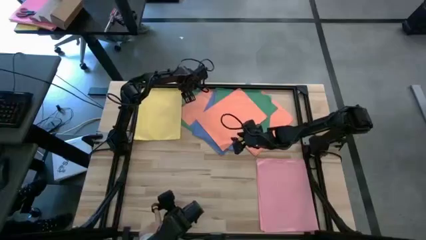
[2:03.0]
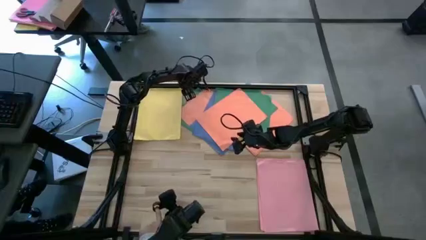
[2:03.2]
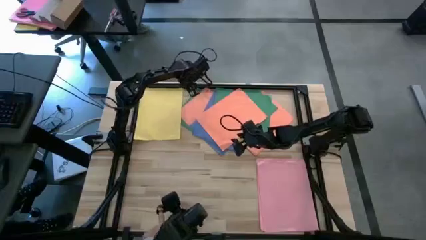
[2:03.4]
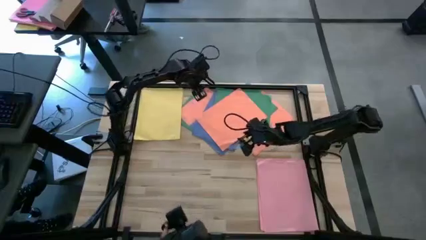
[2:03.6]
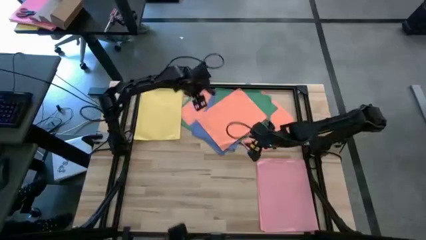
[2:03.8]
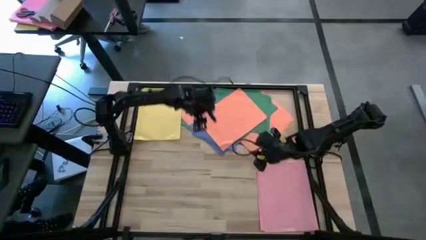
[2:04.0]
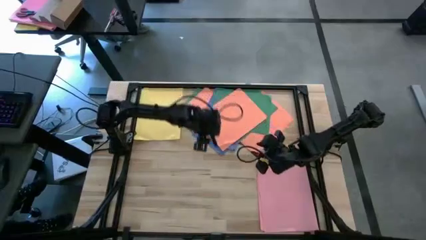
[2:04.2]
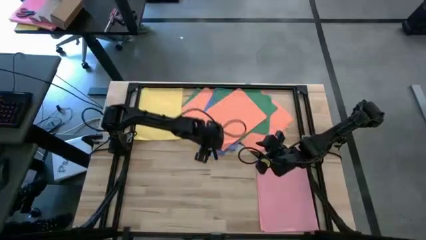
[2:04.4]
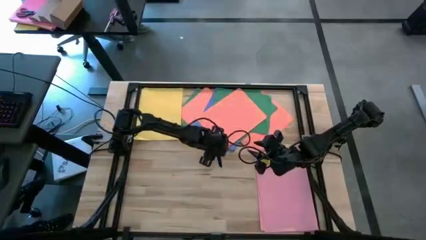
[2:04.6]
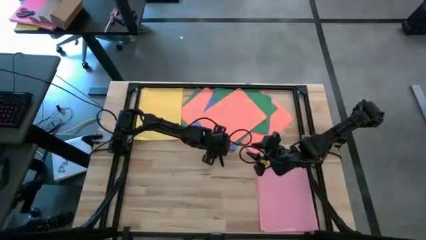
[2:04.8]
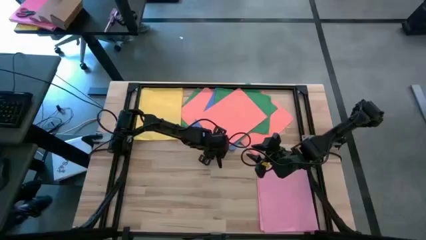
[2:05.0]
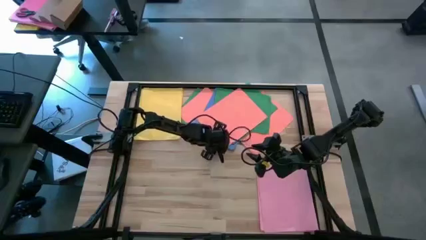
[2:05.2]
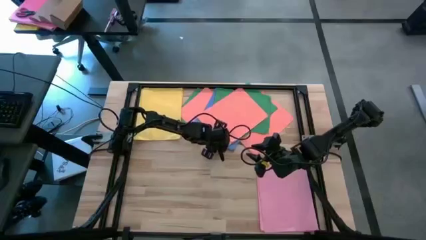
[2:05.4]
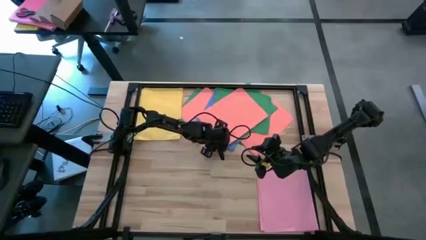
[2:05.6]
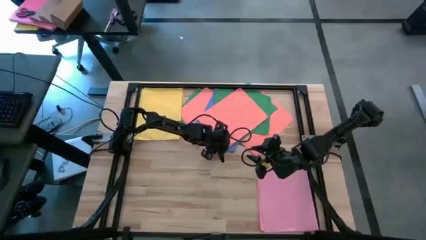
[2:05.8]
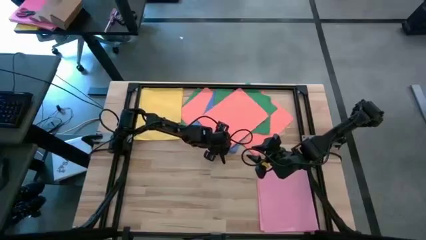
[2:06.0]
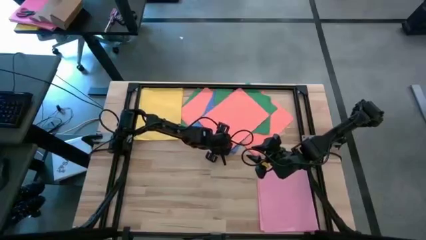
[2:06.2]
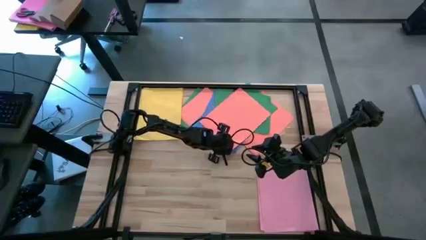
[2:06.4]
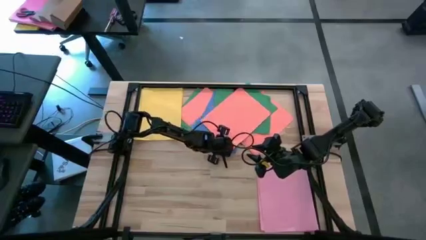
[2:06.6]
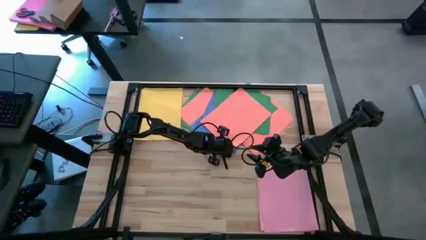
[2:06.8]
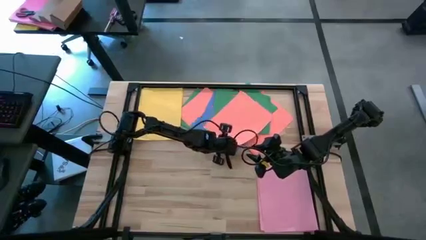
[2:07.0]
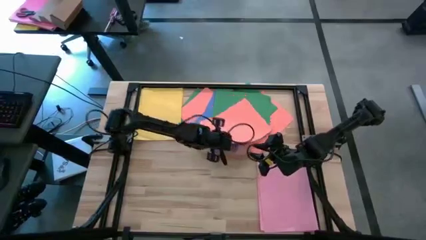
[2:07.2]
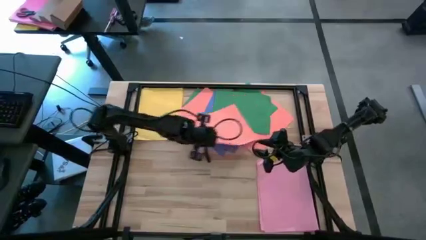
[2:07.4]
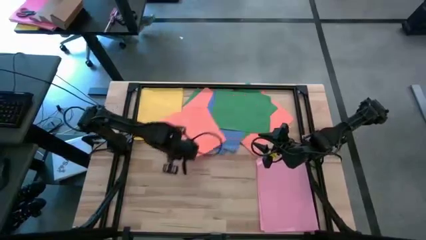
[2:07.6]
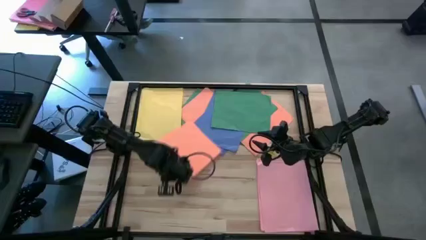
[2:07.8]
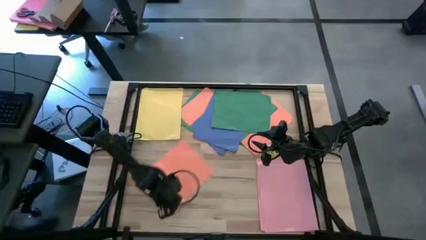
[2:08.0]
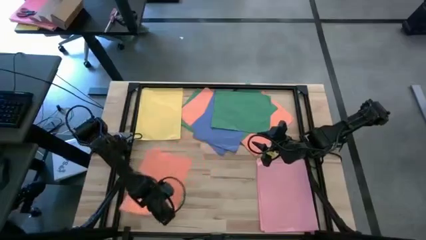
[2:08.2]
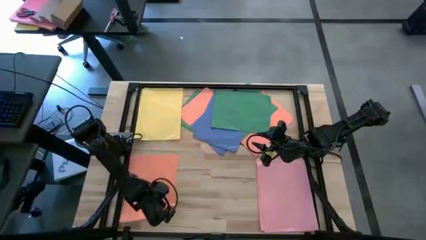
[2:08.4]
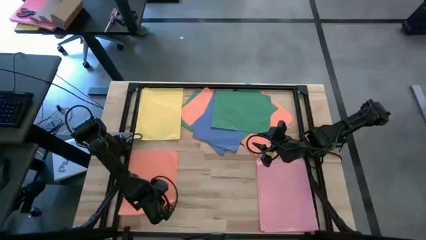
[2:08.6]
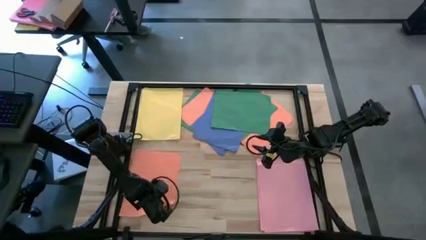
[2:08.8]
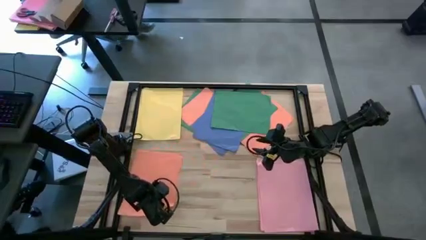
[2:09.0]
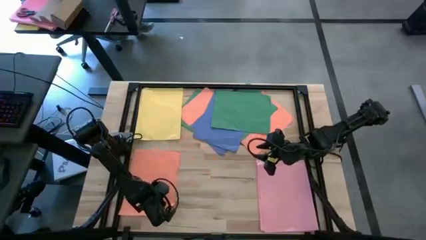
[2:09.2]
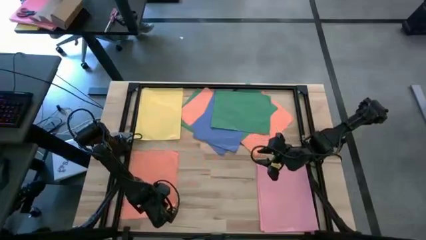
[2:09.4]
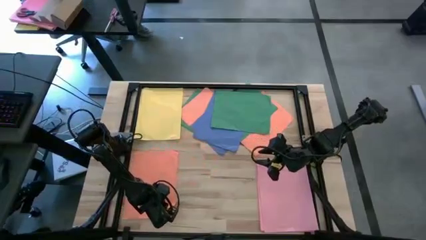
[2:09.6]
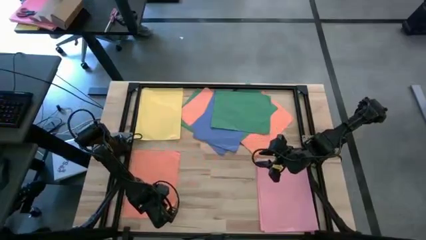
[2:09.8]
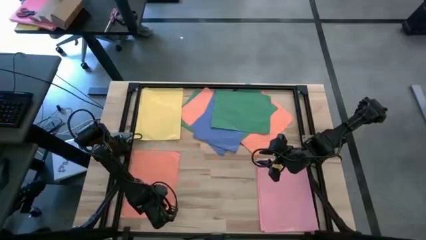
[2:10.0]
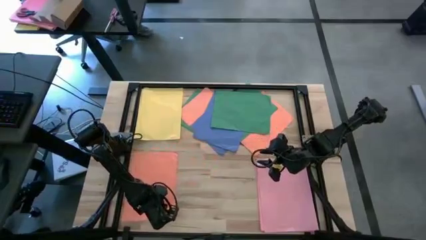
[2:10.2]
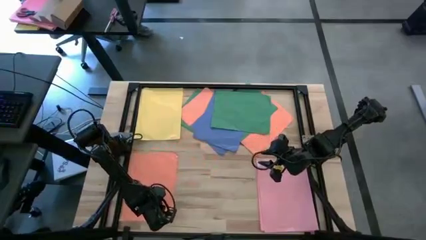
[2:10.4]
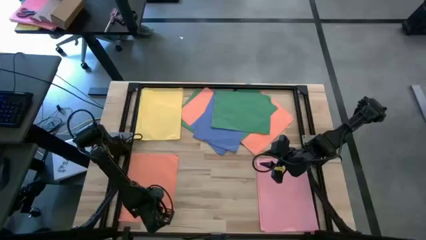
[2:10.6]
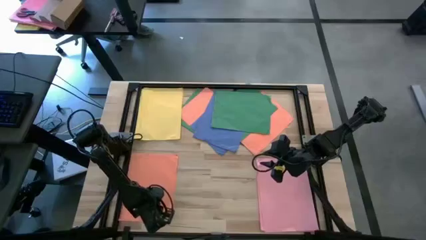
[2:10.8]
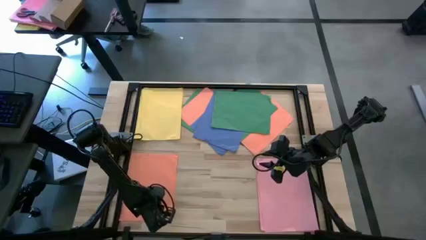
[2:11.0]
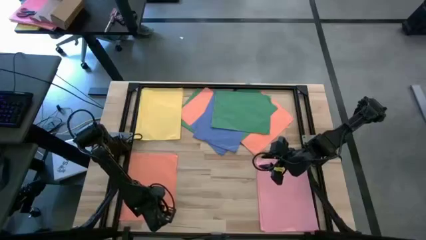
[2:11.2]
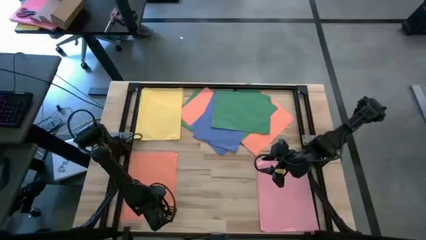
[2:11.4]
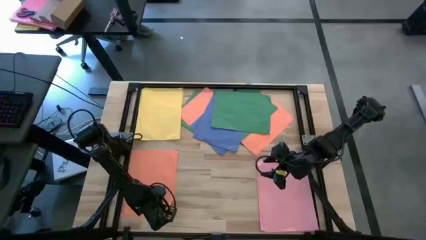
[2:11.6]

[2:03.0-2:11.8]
Task: Organize paper
Move the orange paper to the bottom left of the table

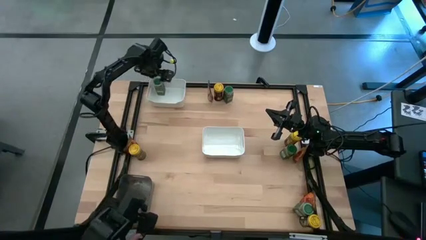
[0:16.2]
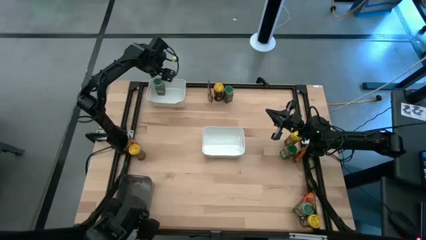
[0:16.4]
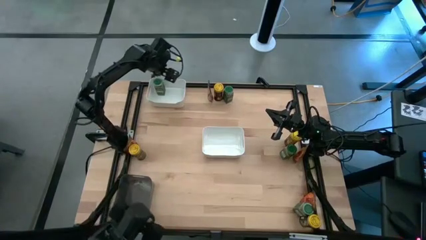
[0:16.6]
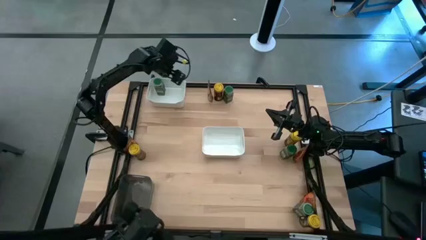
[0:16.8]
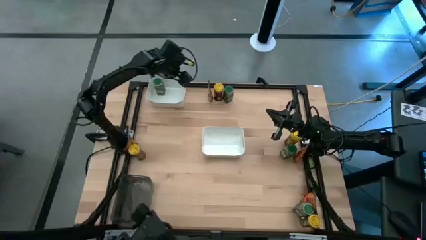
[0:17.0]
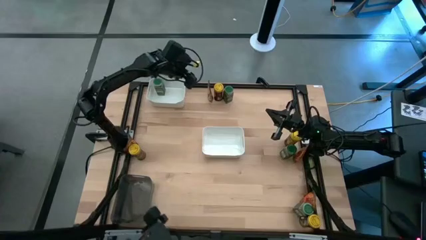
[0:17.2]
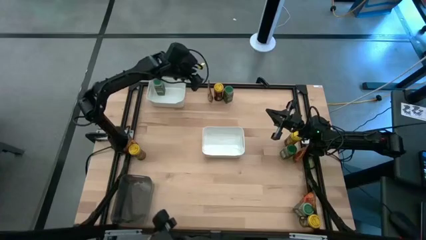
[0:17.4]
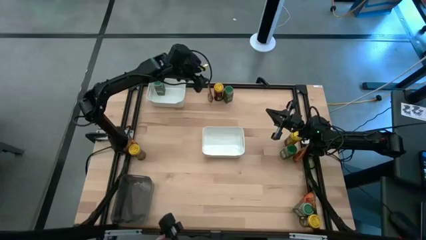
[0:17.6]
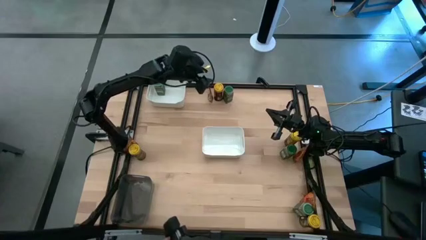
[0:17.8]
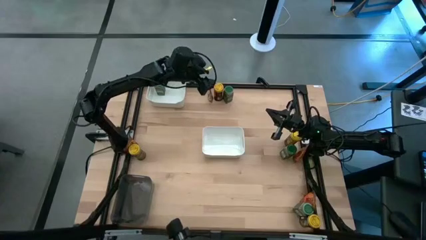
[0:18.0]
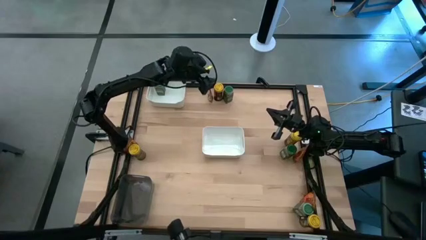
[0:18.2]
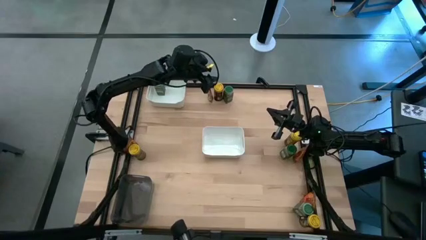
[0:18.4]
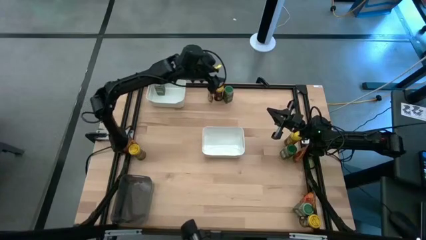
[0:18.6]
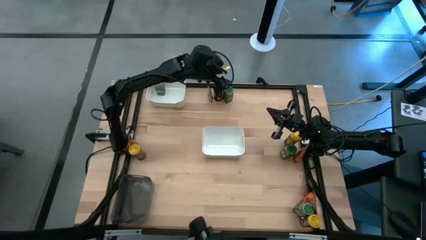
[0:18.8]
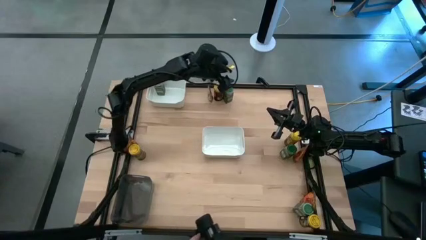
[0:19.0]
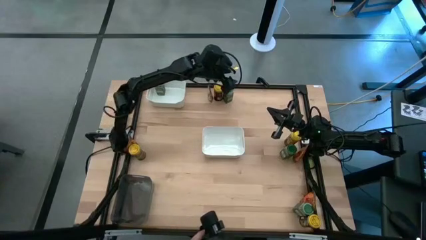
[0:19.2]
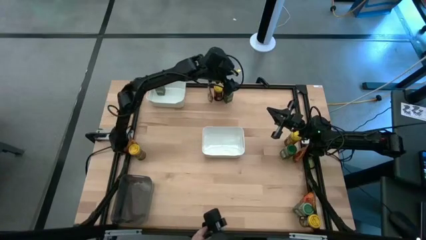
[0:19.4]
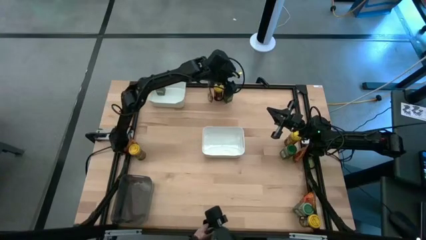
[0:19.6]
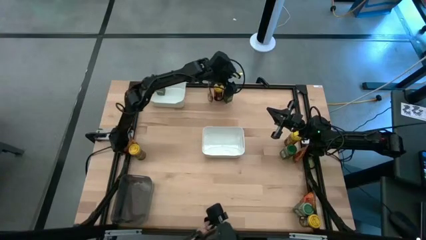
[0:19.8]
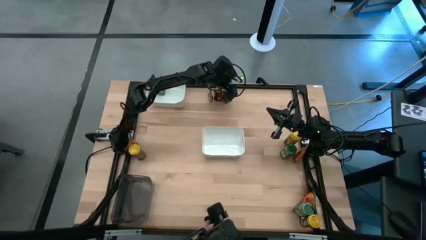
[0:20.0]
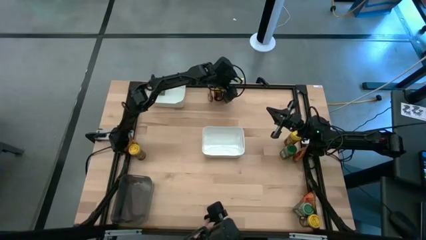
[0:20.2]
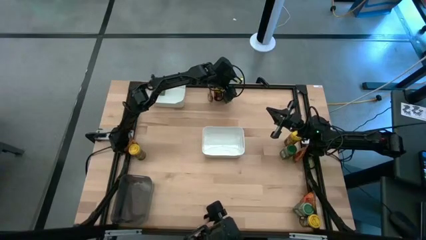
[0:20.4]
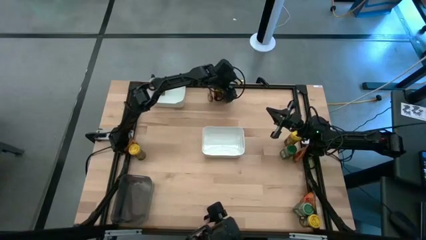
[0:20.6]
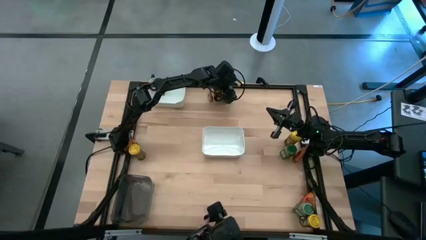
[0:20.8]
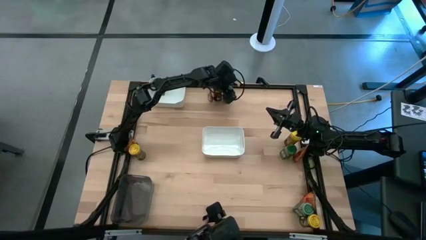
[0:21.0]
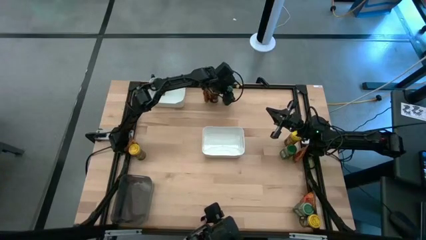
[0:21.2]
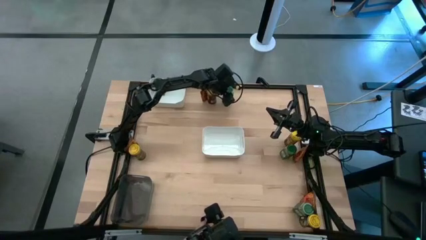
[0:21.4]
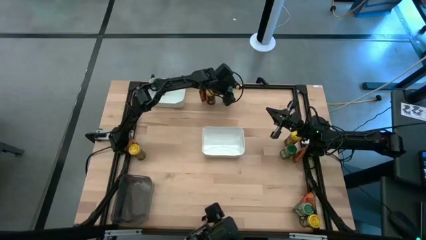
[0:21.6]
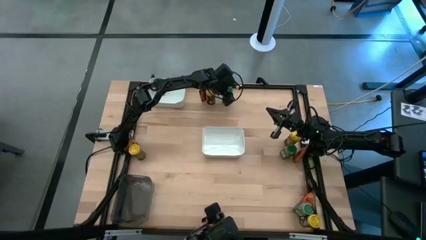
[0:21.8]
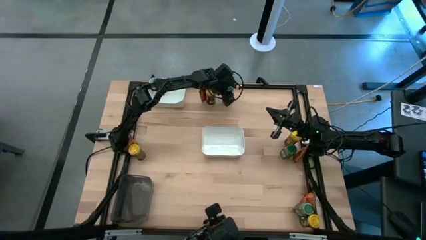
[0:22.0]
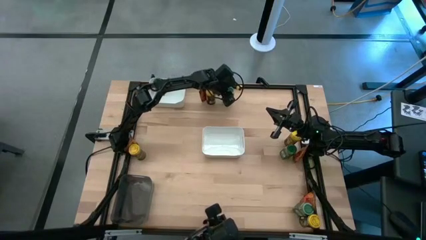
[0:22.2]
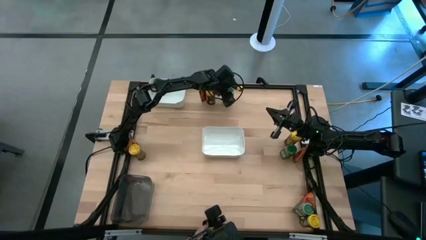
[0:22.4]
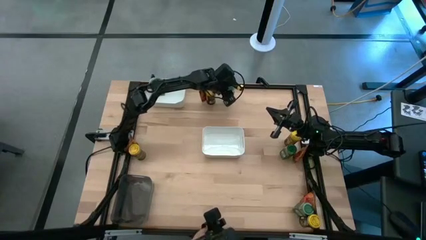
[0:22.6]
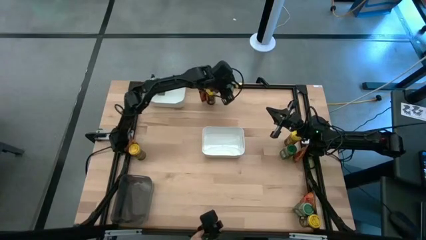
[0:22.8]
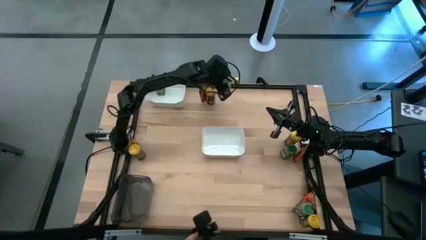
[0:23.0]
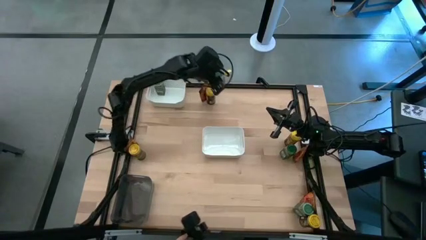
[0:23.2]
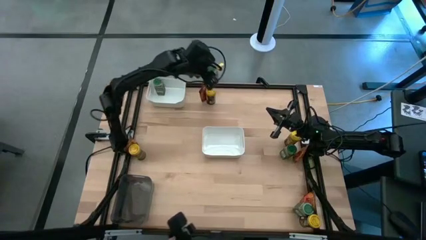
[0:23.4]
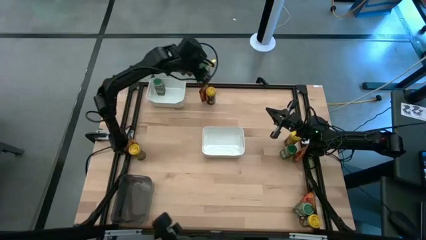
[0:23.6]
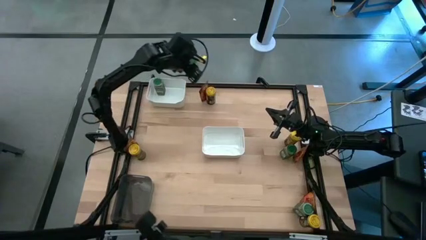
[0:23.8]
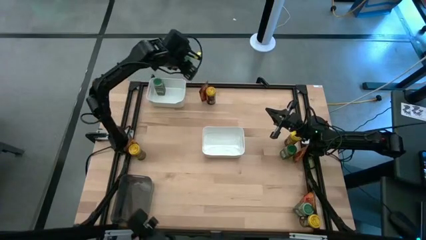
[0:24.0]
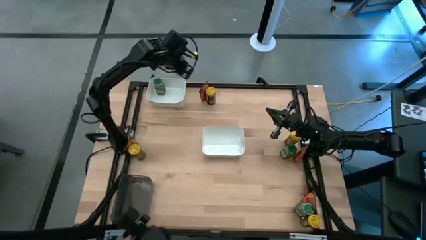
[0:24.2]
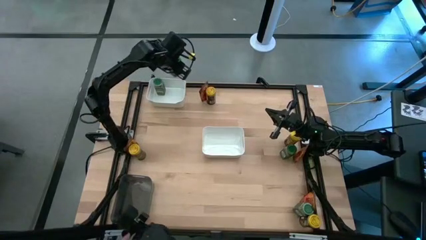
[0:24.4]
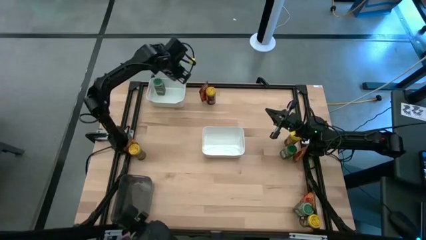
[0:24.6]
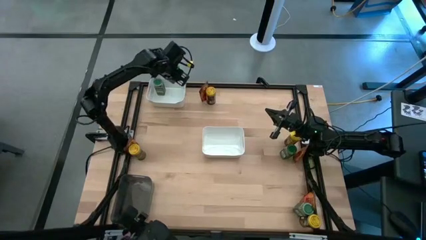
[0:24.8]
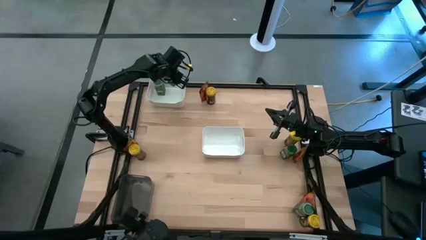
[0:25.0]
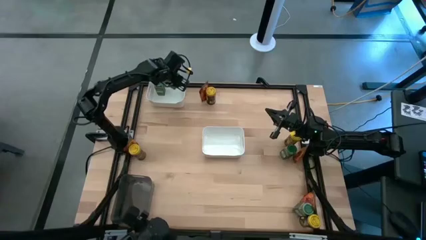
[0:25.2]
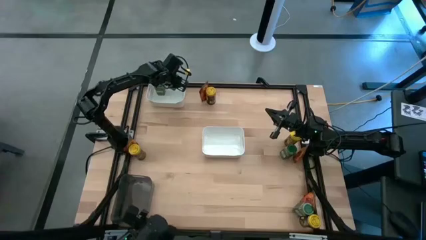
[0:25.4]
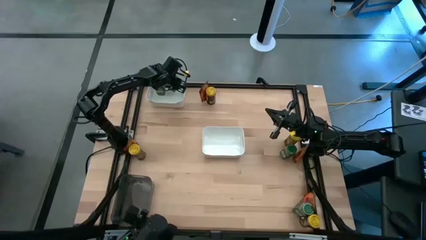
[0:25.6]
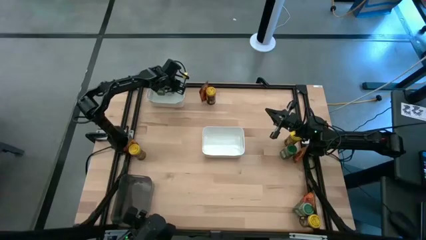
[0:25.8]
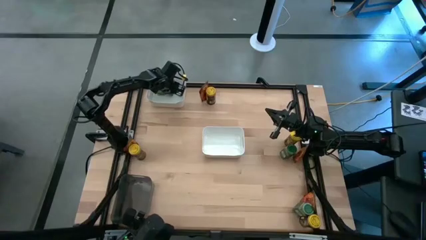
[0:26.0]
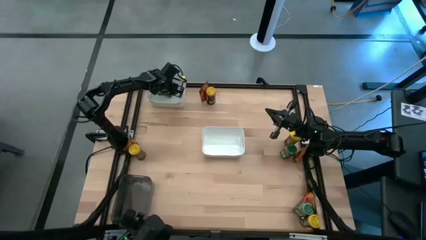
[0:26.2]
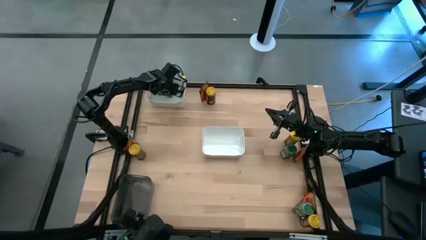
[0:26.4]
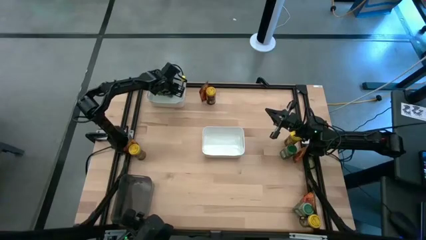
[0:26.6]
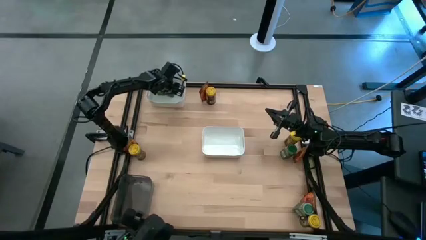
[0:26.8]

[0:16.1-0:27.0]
Task: Sort spices by type
Put the green seasoning bottle into the top white bin
